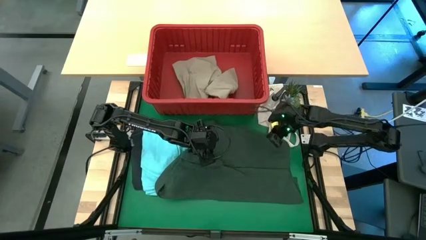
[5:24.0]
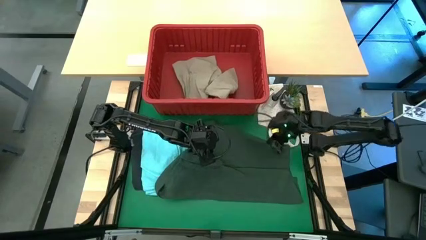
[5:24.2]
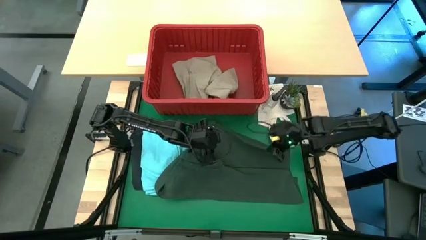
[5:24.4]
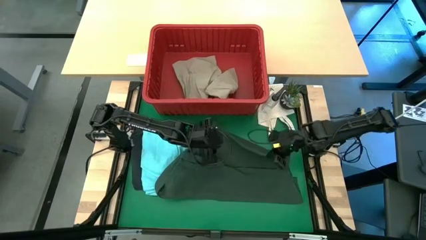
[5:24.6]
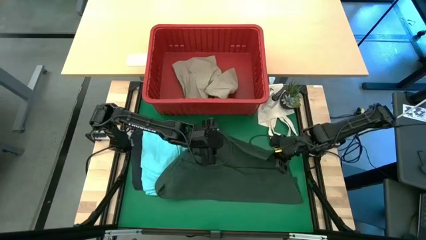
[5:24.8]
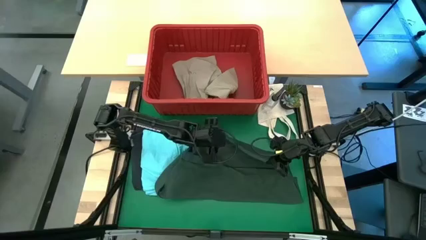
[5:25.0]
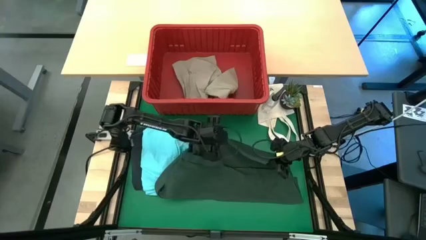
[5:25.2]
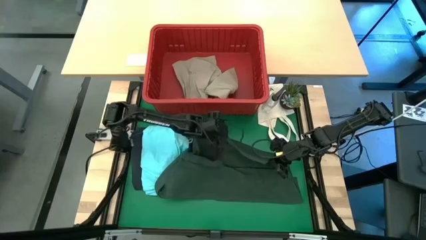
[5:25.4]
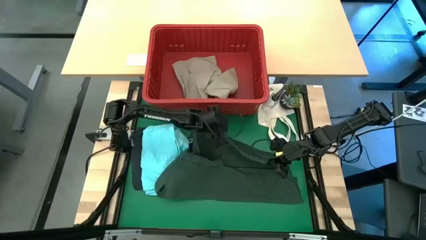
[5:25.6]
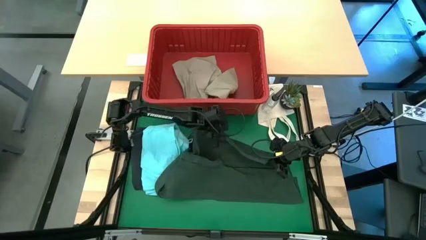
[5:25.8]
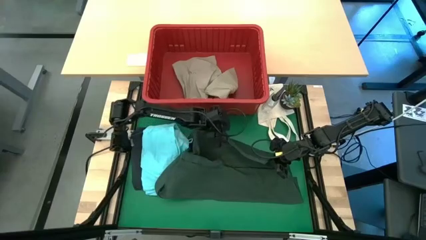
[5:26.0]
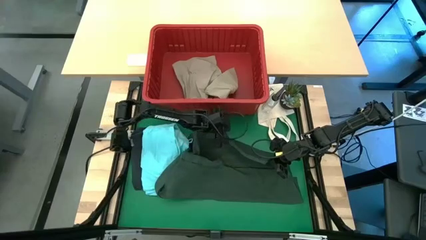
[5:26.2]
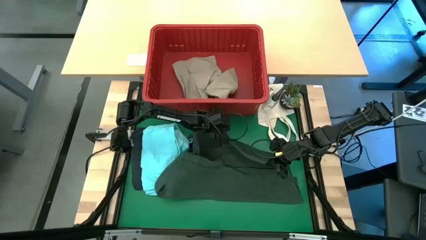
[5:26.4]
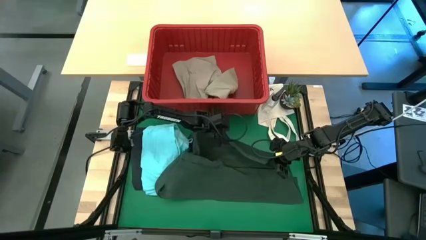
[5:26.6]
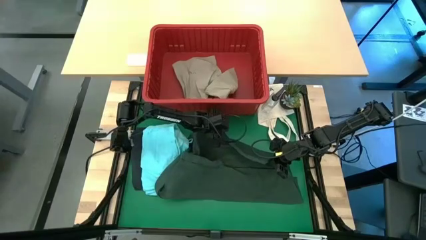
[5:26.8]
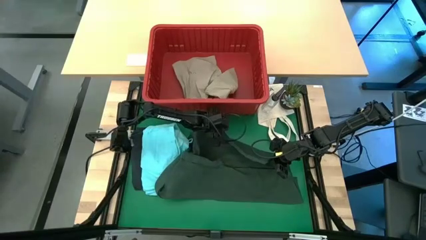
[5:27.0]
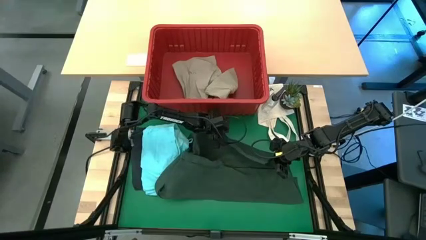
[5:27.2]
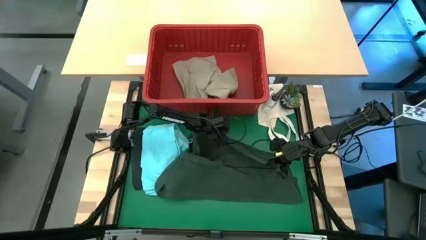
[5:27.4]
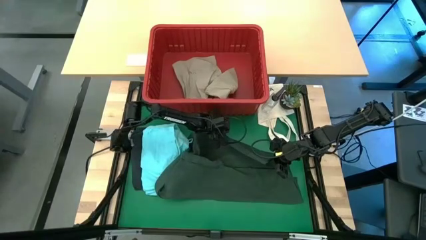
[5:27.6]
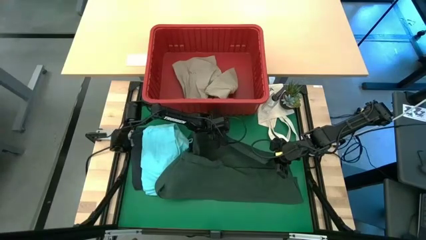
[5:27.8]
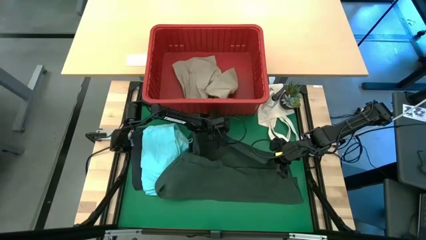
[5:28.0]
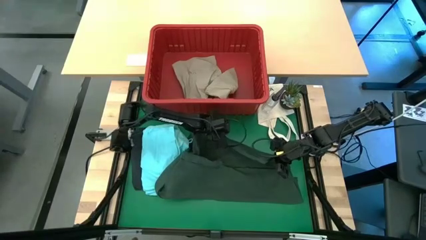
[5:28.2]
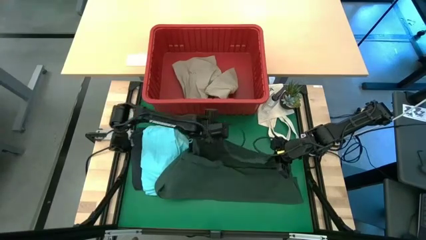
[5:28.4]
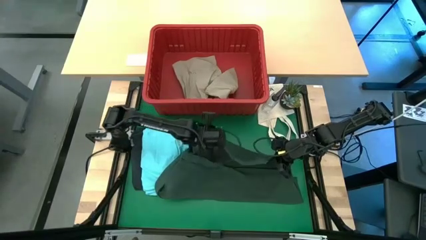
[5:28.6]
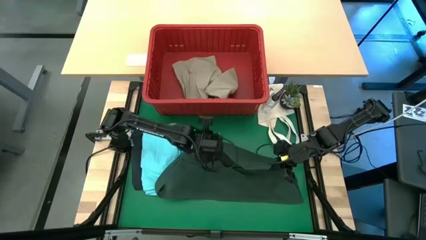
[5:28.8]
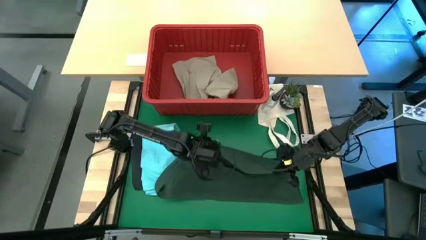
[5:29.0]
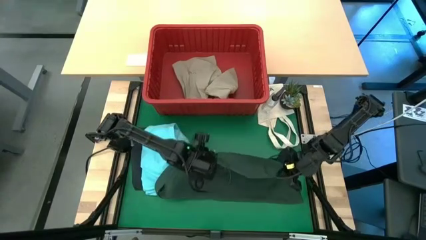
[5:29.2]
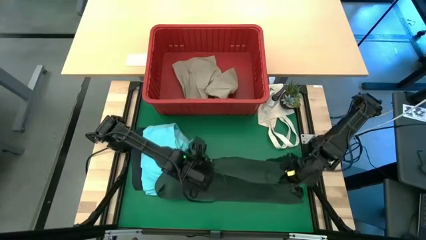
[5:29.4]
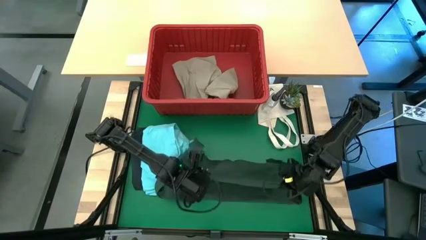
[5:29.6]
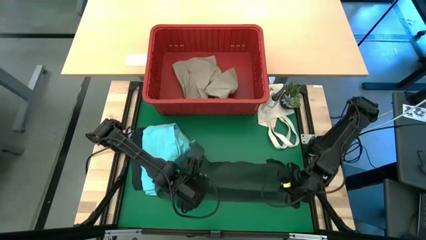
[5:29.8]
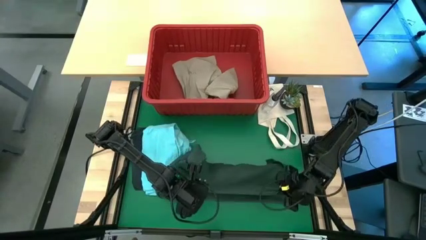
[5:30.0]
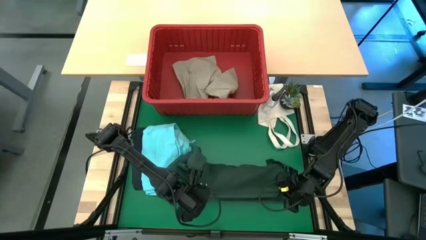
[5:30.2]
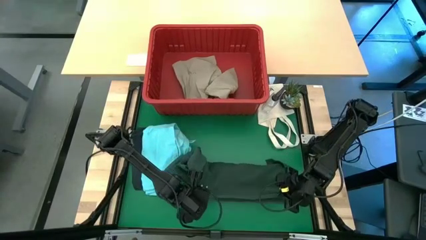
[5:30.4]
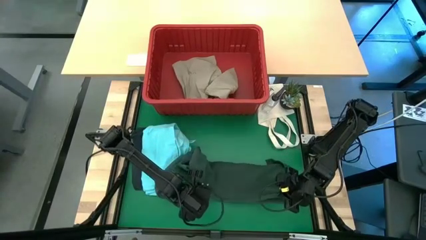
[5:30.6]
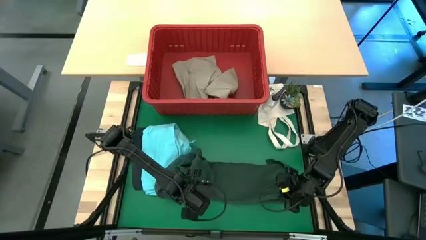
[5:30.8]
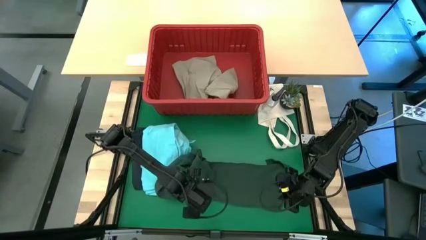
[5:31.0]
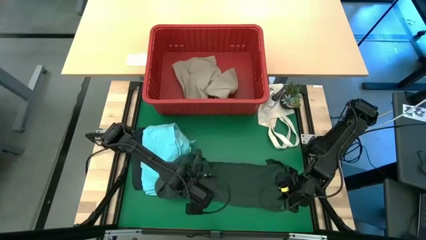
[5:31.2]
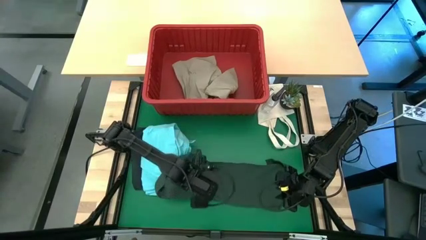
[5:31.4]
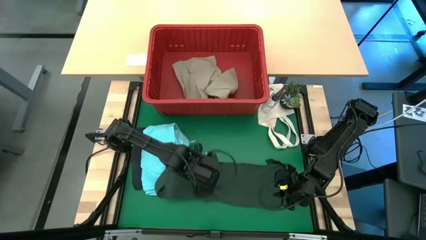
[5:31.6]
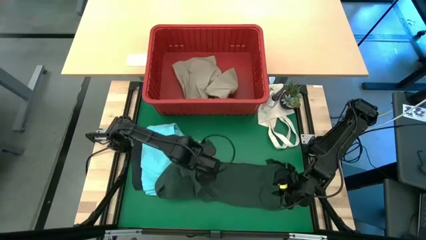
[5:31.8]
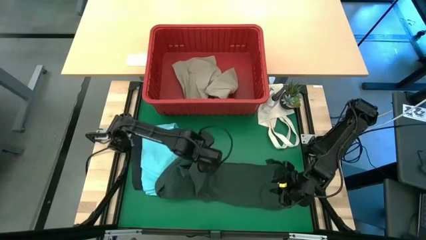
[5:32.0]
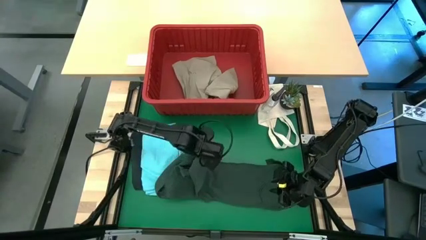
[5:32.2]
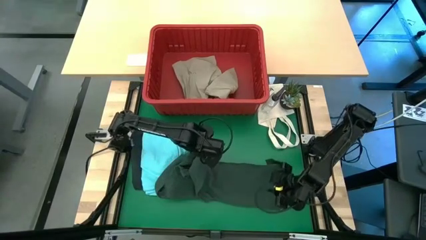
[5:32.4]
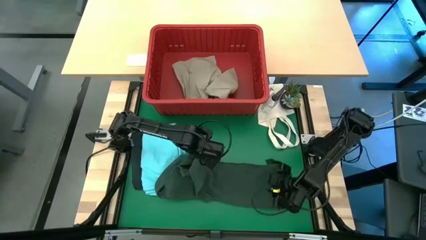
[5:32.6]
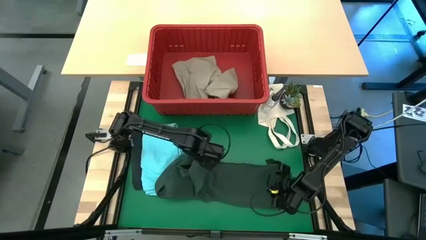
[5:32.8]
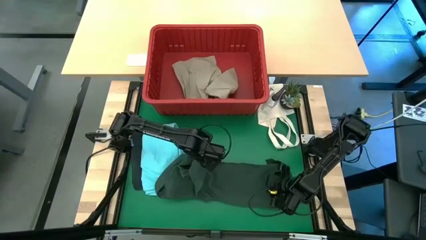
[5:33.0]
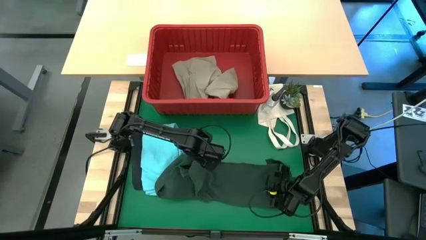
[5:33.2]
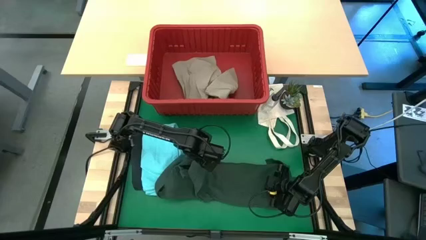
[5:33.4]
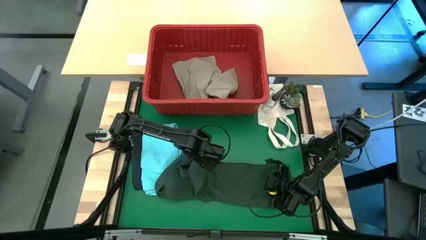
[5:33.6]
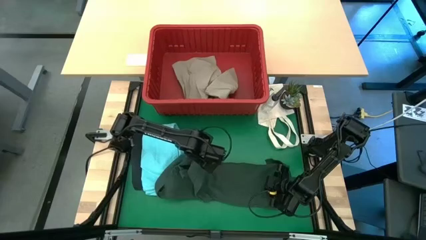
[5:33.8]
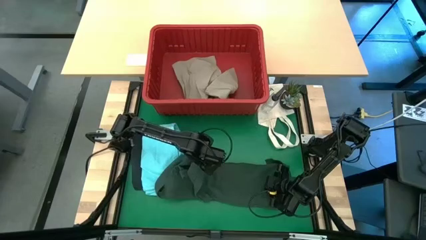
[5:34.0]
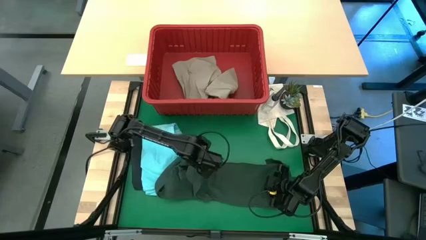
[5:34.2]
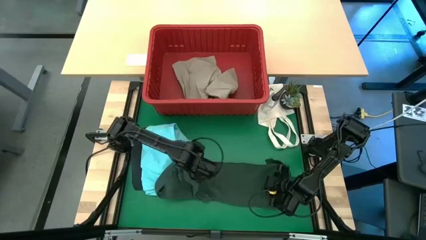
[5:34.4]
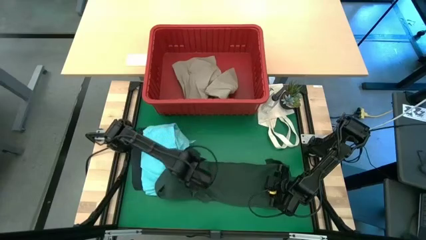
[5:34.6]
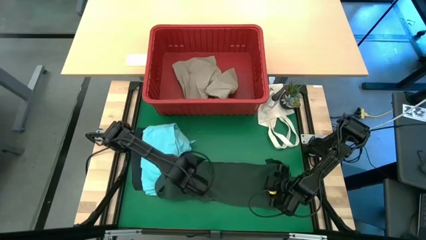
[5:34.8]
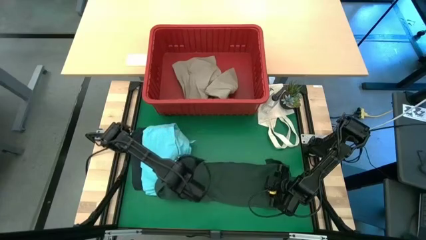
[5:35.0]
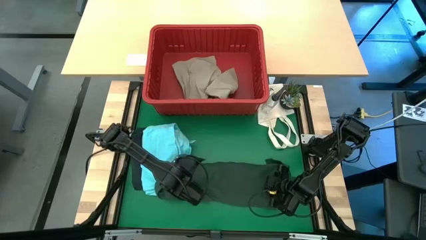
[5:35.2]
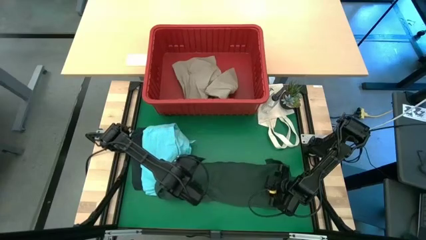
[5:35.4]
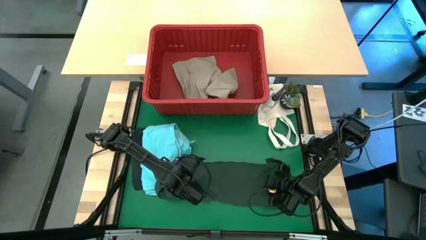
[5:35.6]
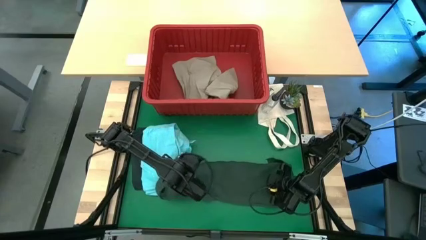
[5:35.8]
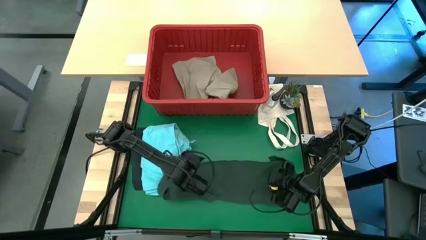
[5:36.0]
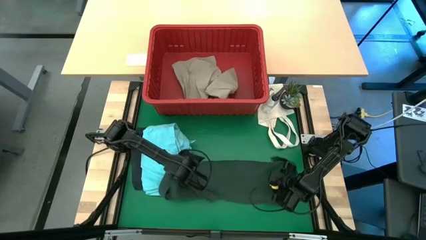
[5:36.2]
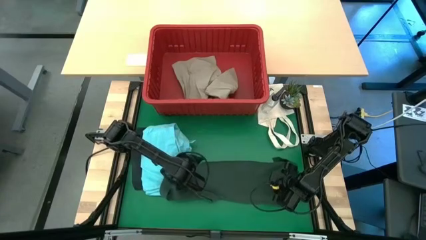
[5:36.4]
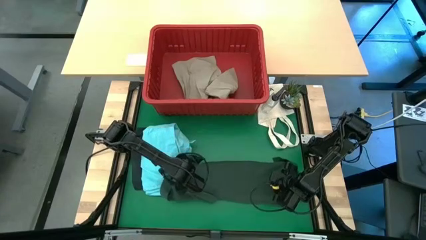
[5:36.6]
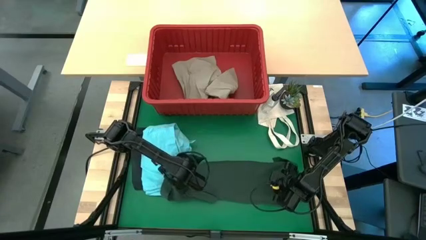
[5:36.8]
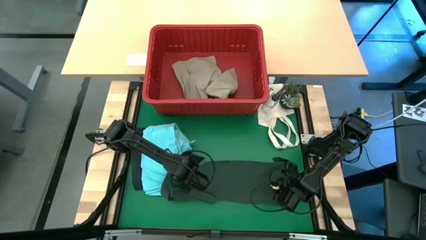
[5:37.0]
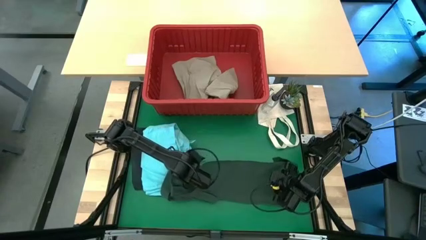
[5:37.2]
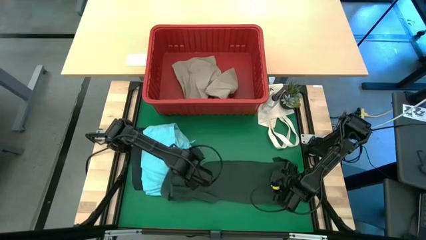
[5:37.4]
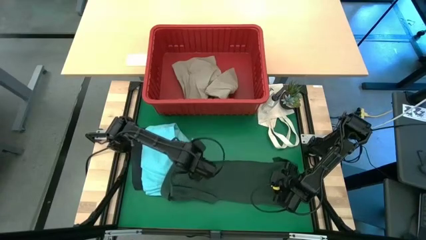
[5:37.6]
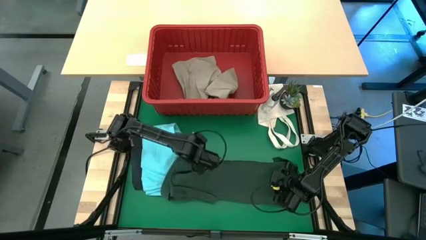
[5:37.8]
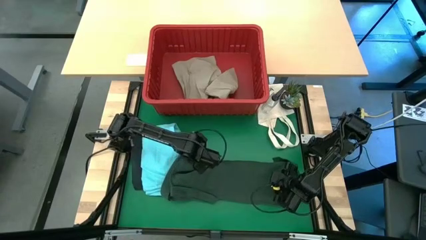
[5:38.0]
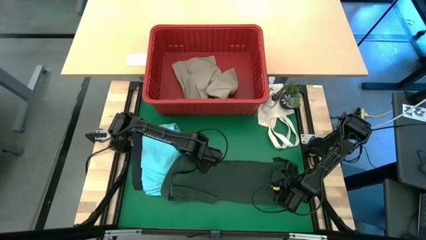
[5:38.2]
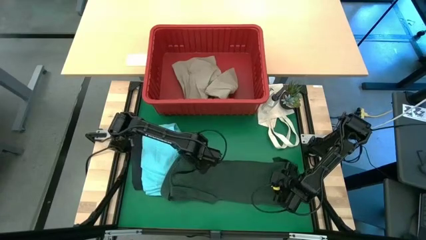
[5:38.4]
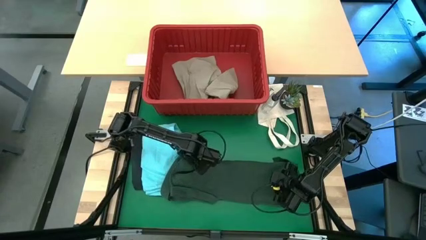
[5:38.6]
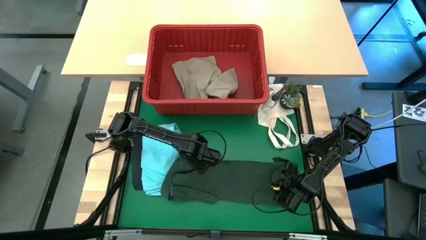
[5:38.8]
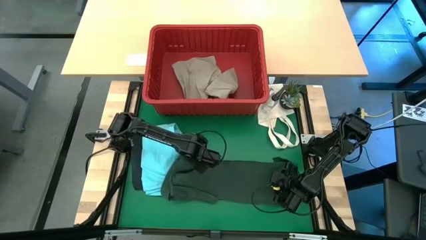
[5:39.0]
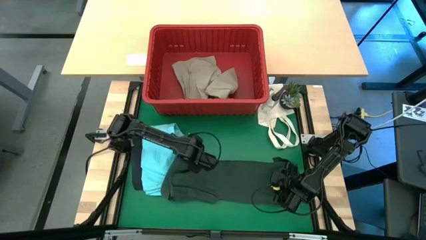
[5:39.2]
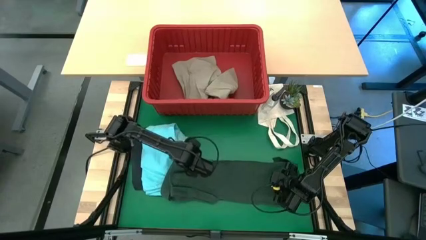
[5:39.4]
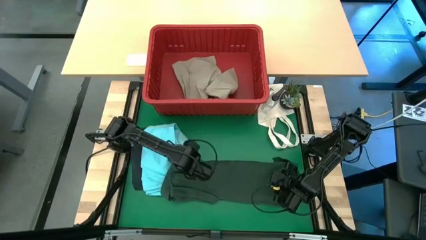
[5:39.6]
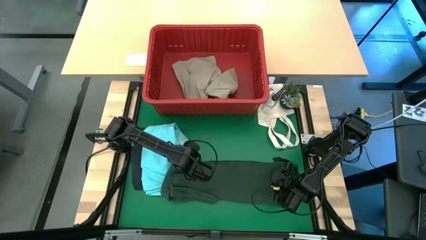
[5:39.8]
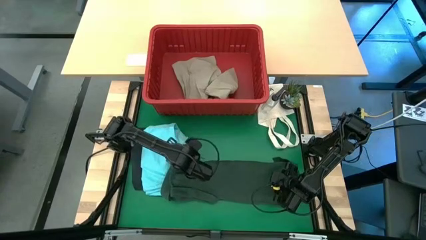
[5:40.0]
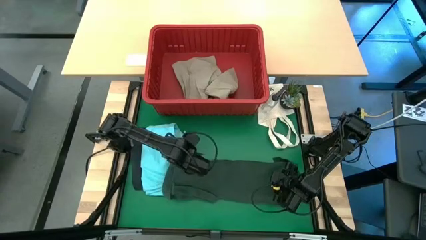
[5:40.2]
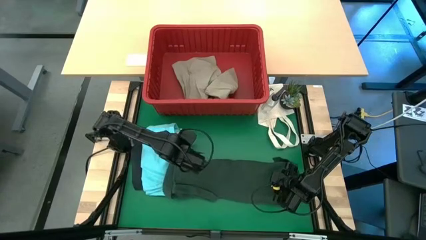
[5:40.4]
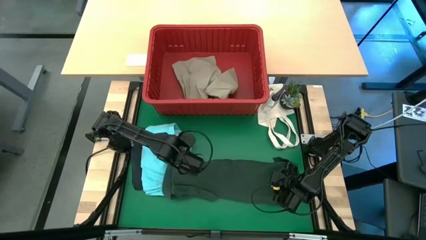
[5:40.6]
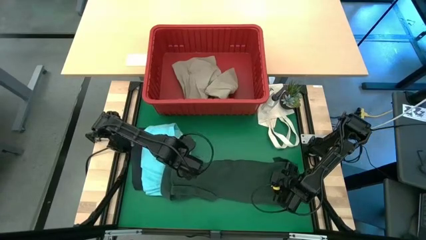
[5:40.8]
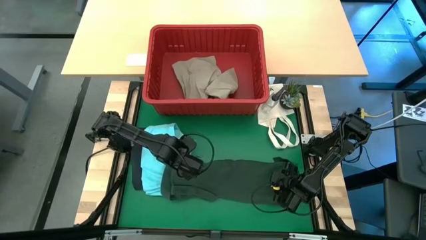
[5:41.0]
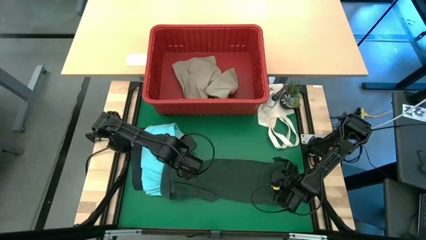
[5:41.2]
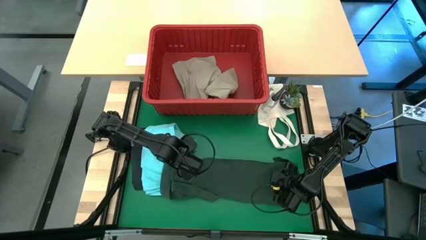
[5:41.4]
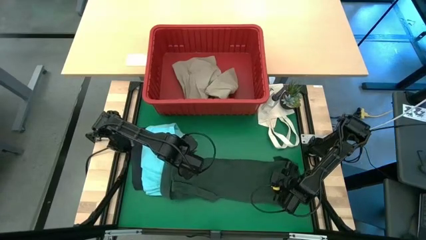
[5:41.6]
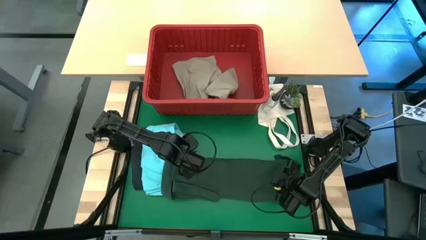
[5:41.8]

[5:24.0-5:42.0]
Task: Fold Laundry from Bin
Fold the green polo shirt from the red laundry bin
